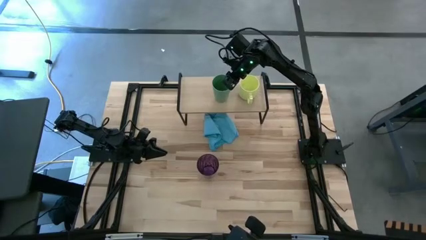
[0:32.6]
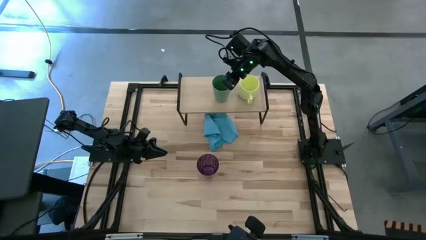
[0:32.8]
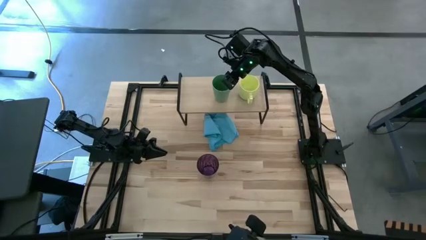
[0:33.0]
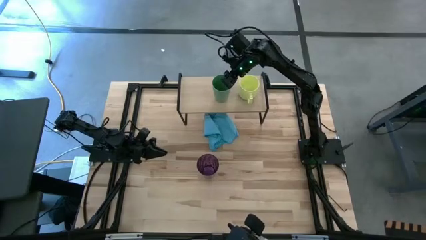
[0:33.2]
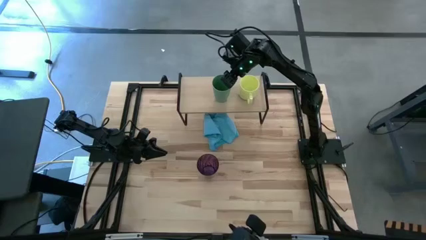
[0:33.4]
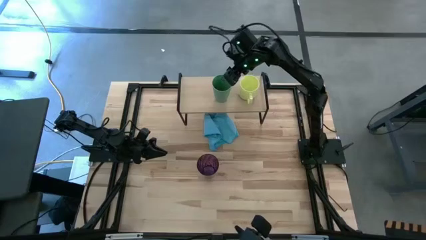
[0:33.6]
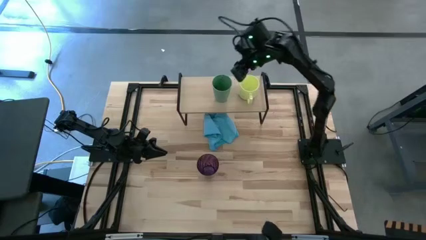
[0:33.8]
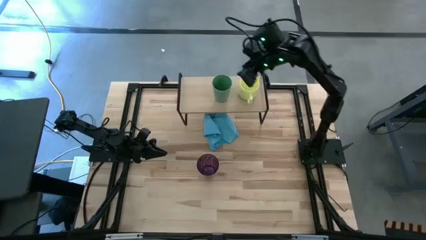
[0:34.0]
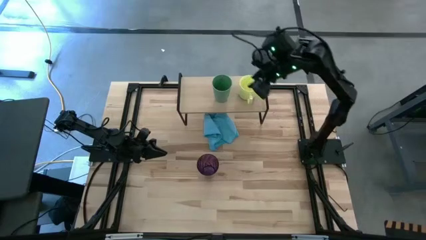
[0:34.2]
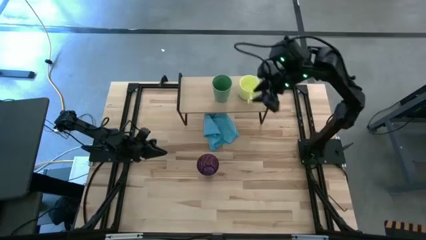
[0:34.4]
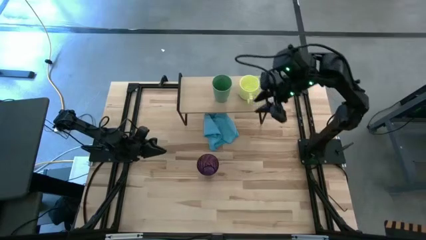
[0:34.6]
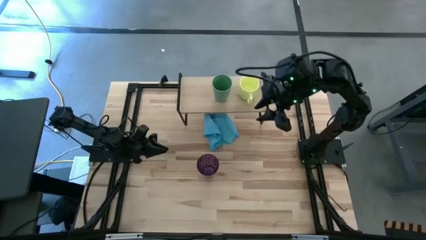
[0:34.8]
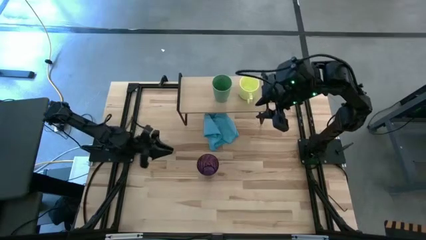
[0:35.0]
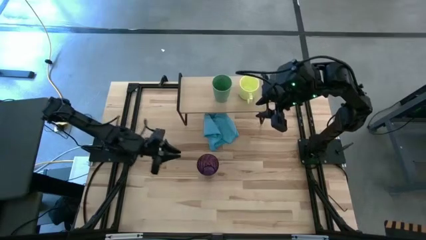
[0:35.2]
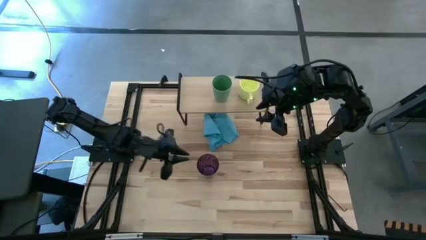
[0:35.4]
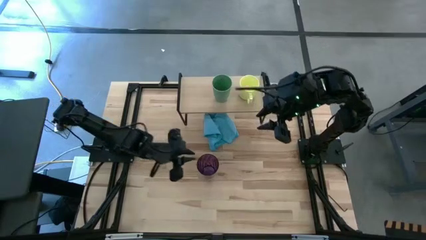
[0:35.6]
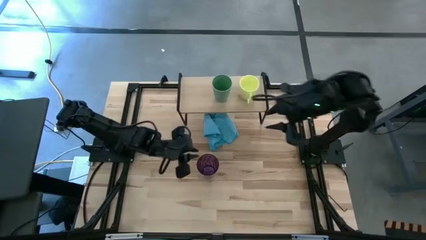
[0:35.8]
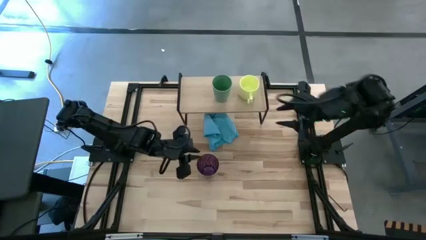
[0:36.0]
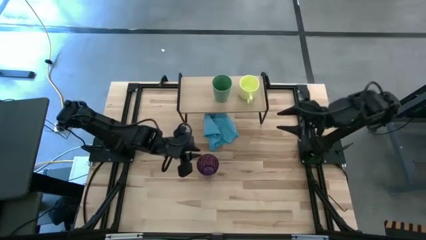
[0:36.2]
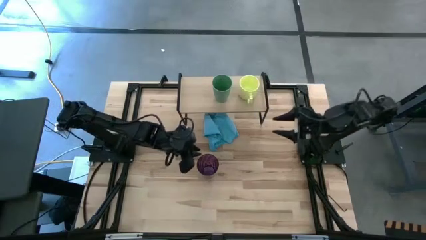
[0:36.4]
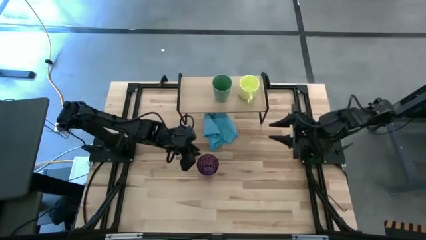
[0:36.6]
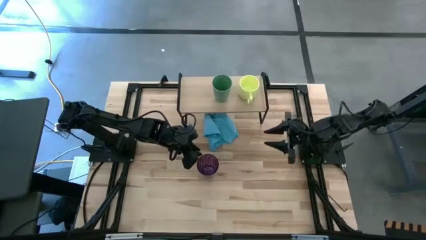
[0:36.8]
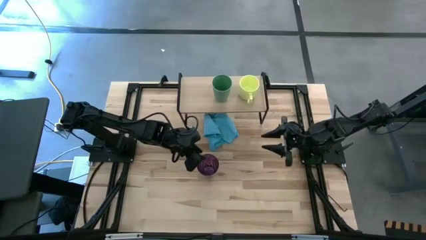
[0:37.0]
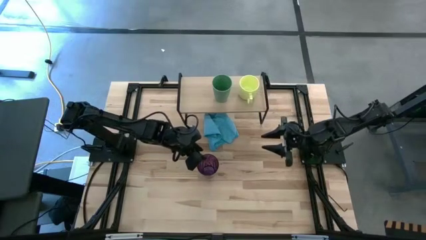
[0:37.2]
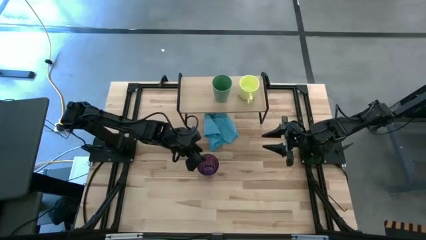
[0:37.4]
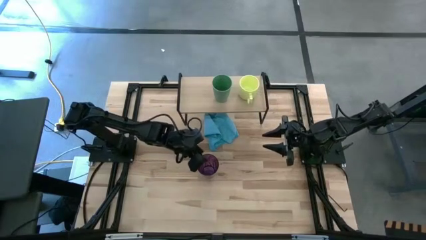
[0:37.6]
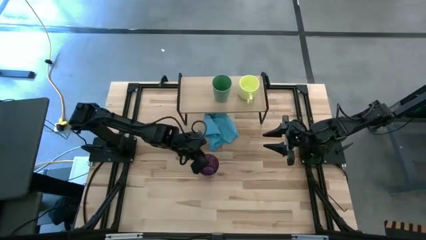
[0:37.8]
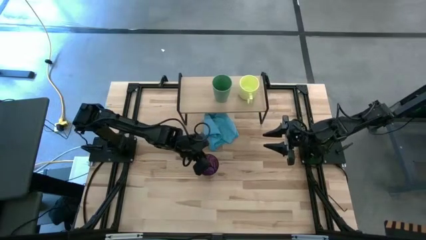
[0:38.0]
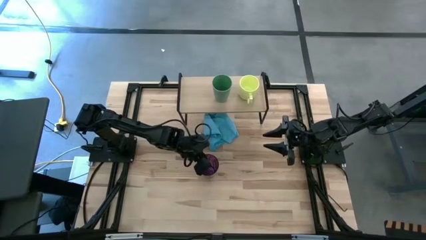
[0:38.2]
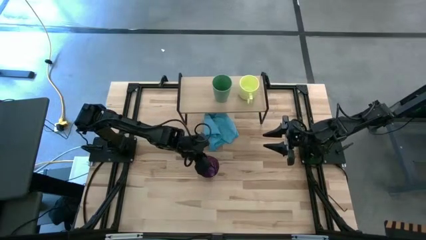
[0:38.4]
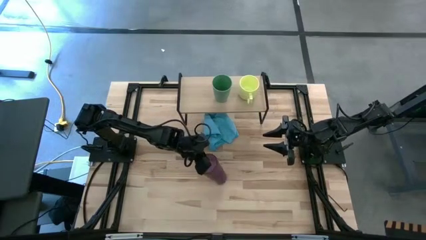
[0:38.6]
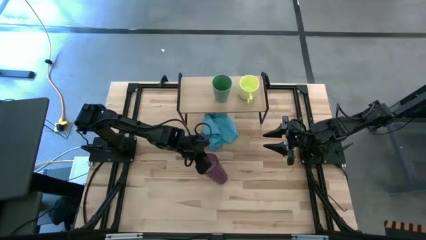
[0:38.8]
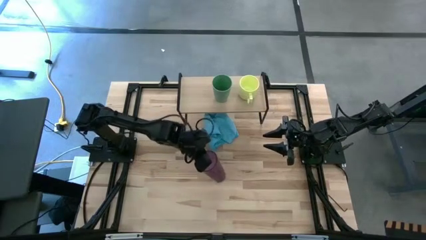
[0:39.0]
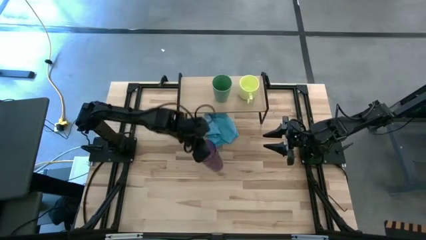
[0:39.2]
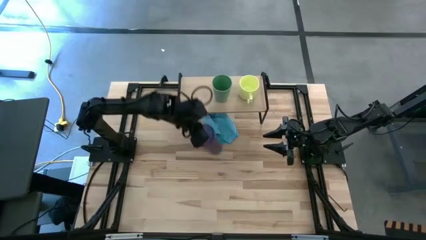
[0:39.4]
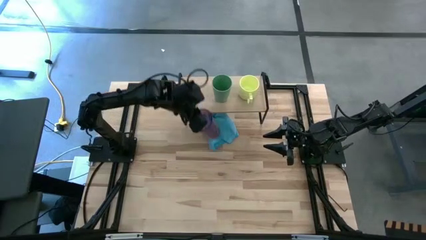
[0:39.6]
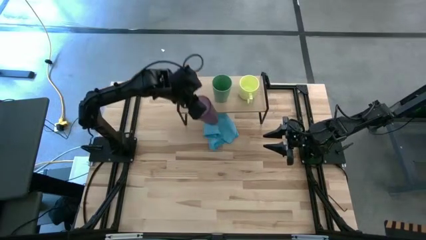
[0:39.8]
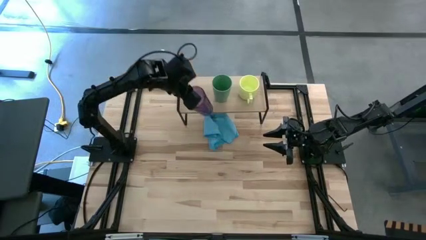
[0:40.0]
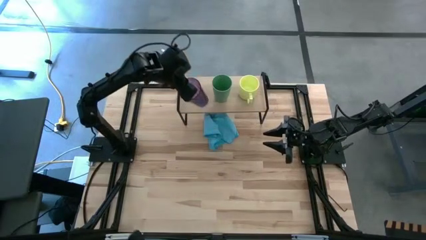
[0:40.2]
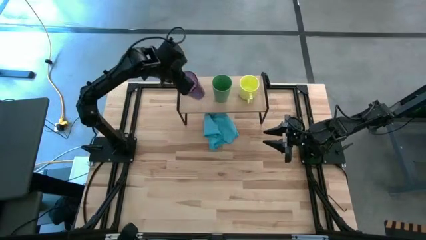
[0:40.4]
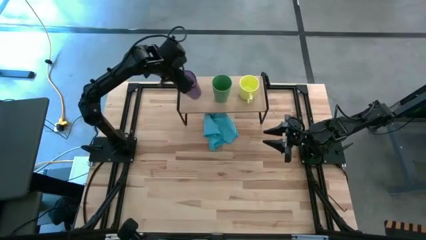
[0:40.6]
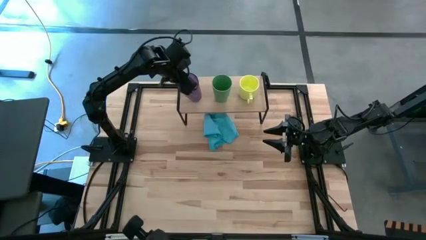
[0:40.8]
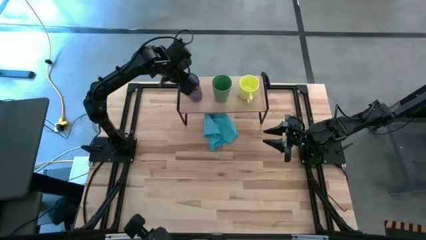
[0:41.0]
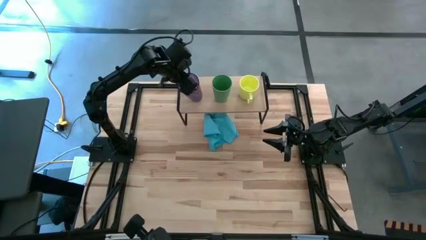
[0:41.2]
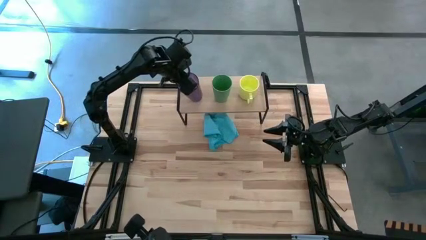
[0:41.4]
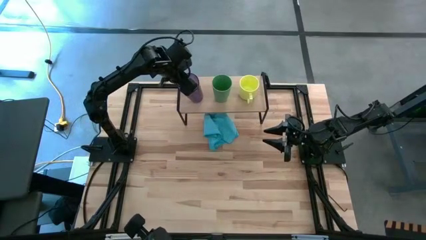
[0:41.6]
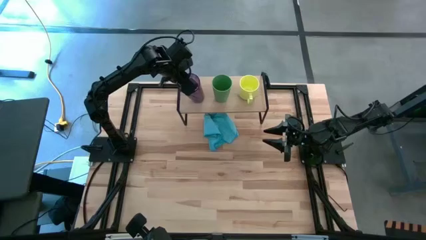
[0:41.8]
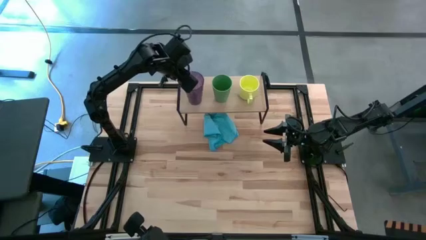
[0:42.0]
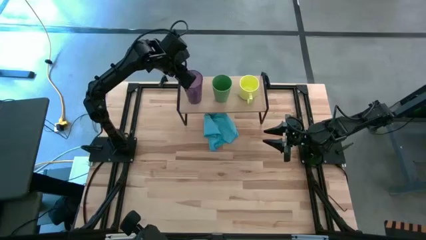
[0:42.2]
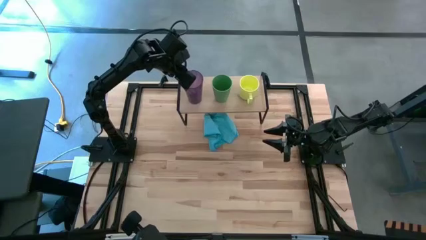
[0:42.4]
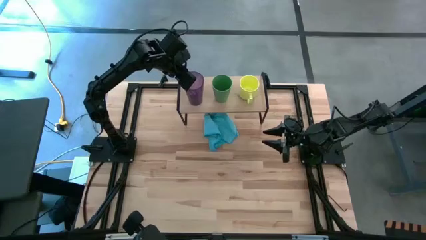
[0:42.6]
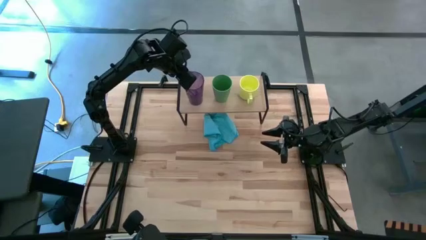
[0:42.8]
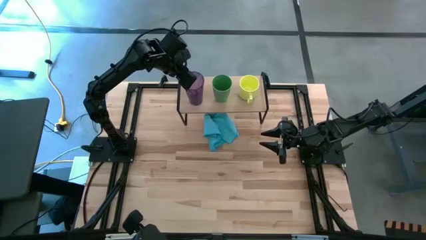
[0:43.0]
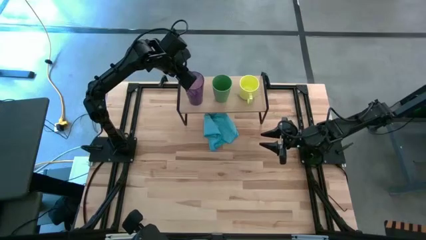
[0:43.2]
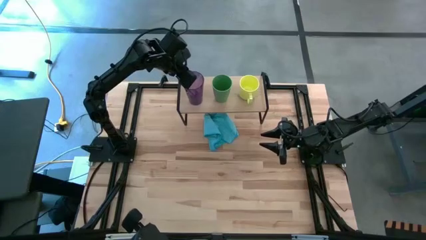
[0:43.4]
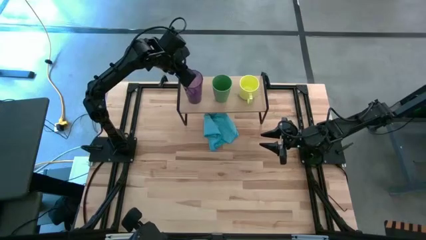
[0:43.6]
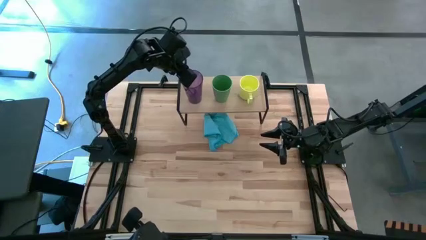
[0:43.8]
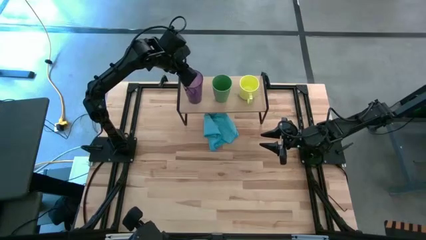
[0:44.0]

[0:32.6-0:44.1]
Task: Stack small to large cups/mugs on shelf
Put the purple transparent cup on the shelf
